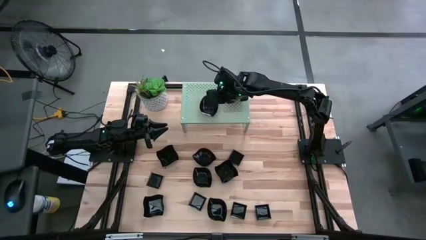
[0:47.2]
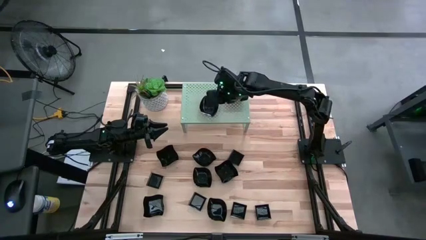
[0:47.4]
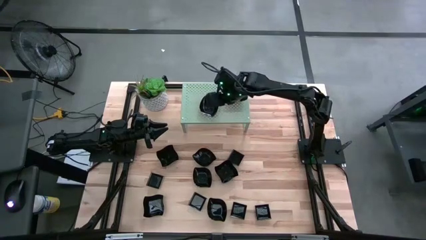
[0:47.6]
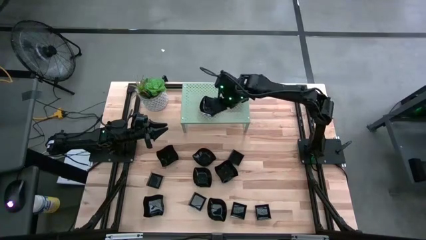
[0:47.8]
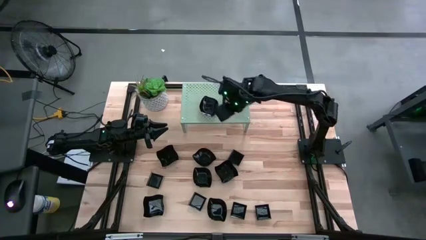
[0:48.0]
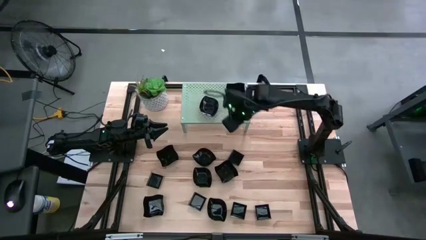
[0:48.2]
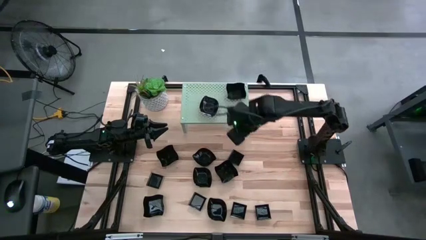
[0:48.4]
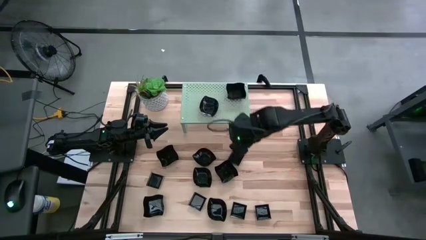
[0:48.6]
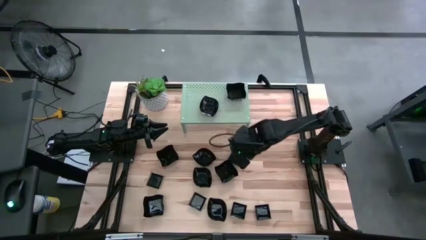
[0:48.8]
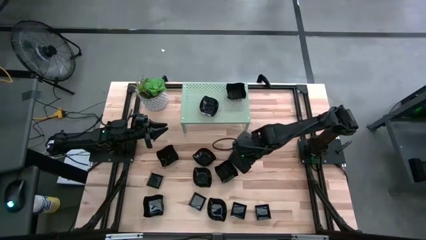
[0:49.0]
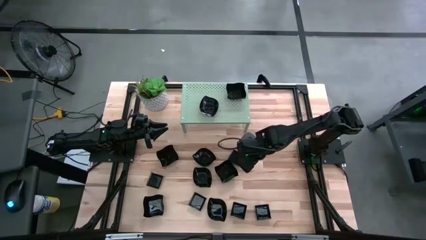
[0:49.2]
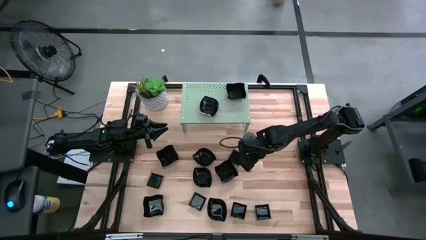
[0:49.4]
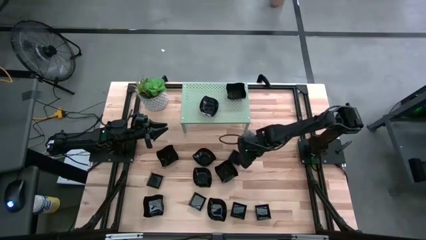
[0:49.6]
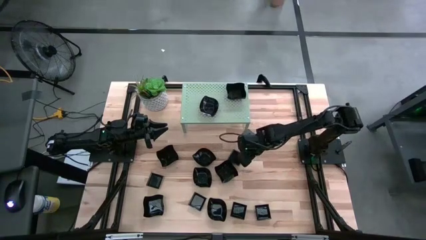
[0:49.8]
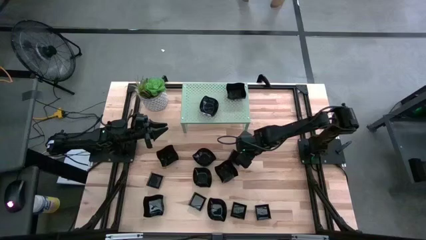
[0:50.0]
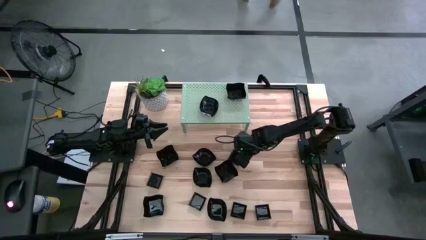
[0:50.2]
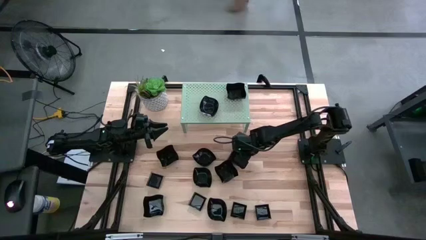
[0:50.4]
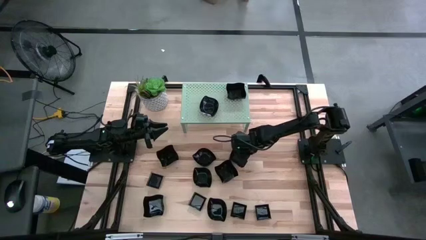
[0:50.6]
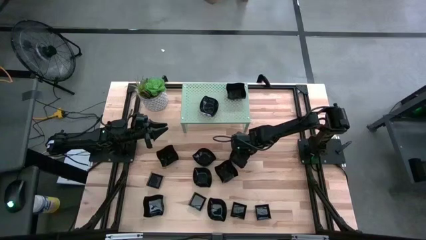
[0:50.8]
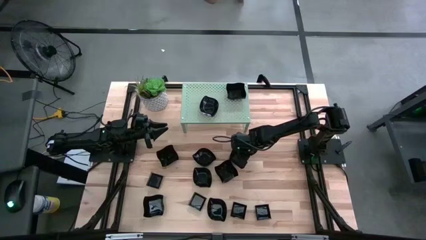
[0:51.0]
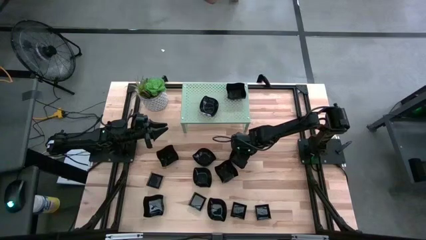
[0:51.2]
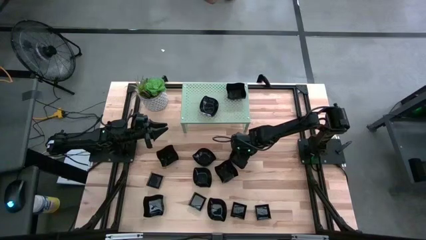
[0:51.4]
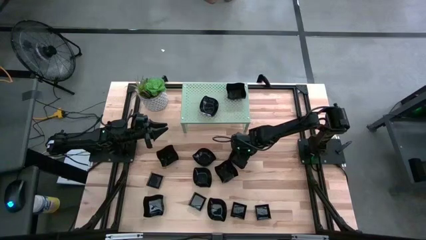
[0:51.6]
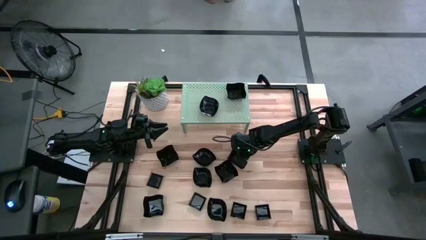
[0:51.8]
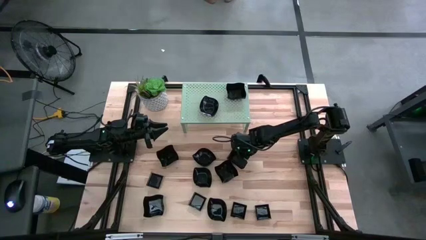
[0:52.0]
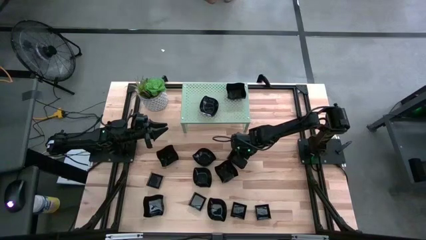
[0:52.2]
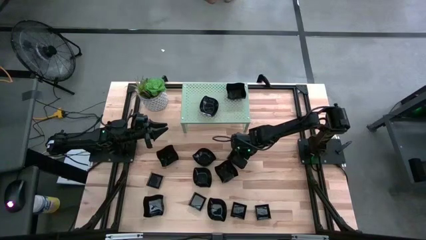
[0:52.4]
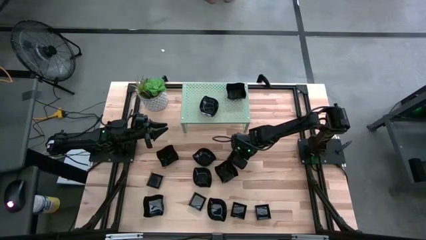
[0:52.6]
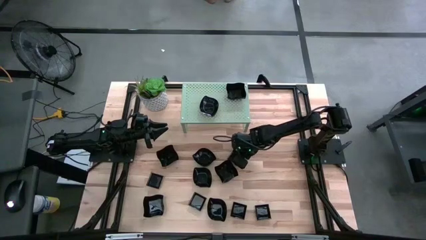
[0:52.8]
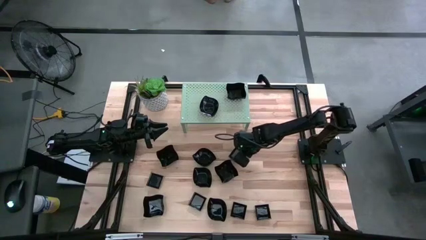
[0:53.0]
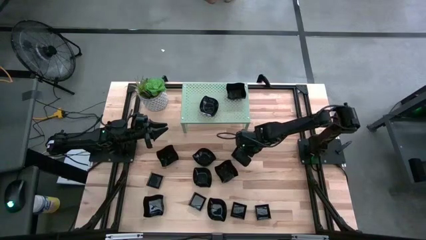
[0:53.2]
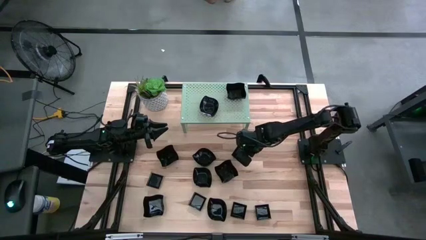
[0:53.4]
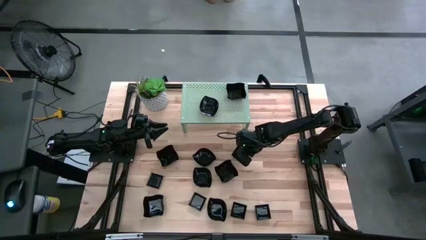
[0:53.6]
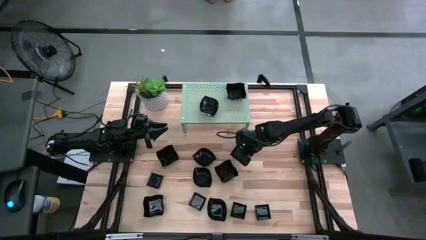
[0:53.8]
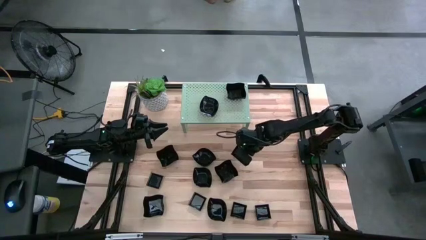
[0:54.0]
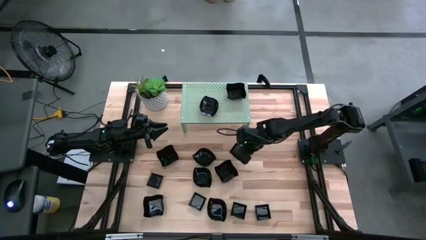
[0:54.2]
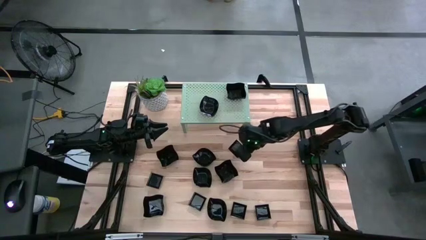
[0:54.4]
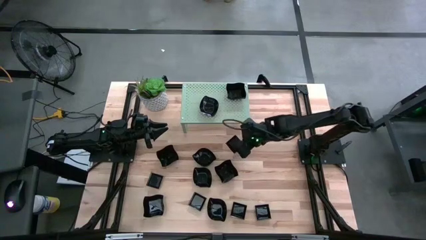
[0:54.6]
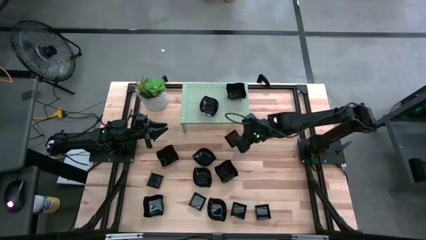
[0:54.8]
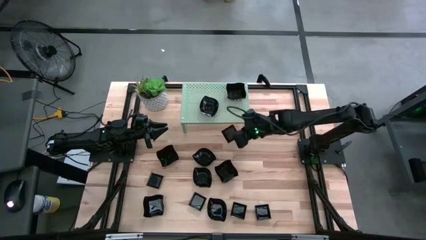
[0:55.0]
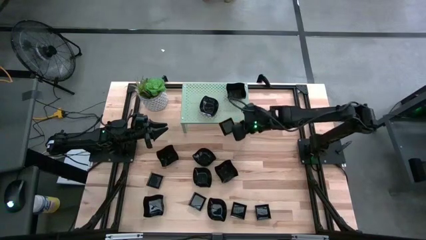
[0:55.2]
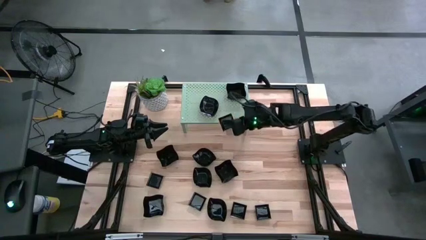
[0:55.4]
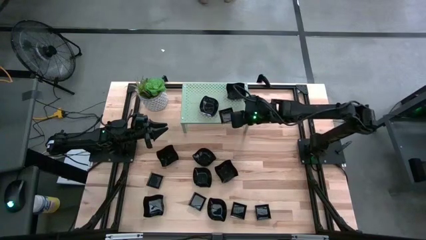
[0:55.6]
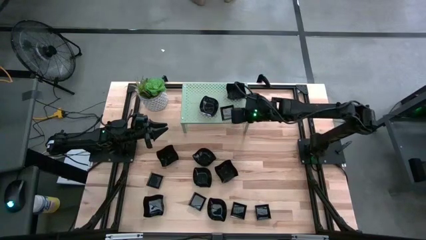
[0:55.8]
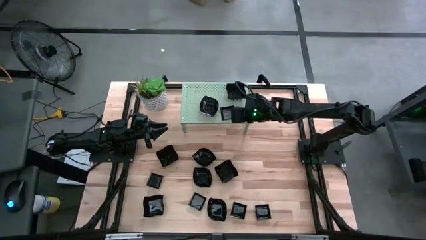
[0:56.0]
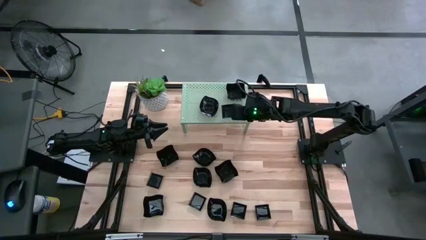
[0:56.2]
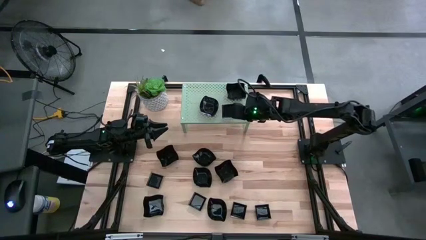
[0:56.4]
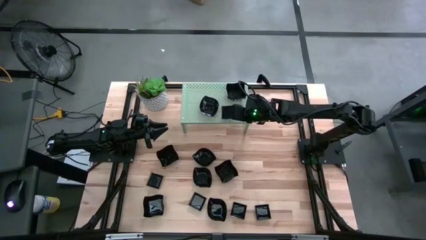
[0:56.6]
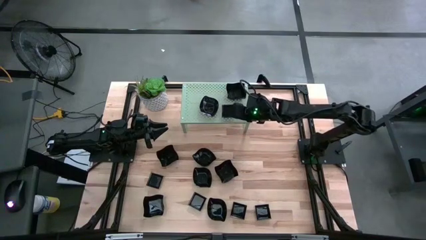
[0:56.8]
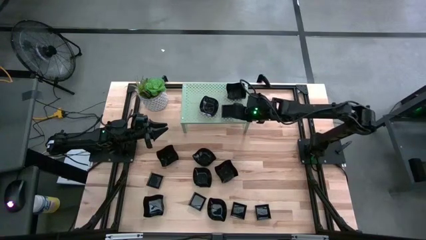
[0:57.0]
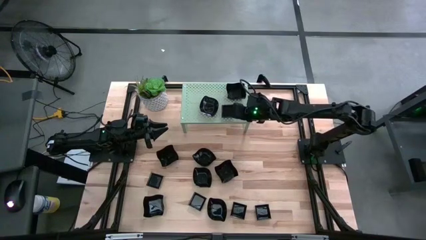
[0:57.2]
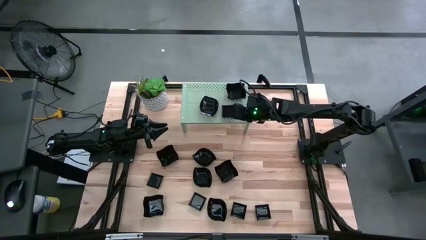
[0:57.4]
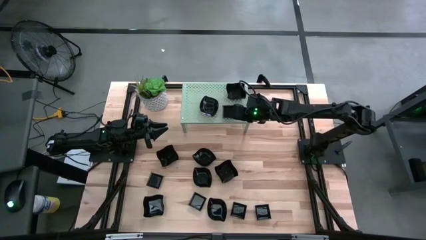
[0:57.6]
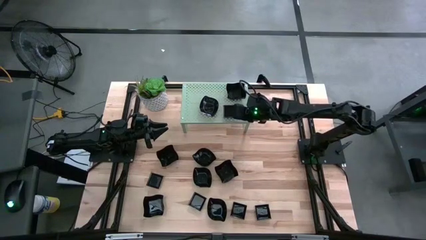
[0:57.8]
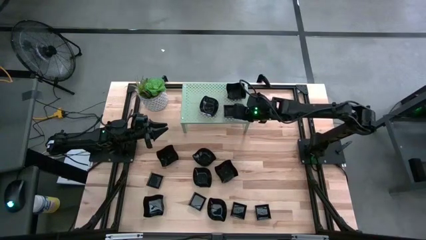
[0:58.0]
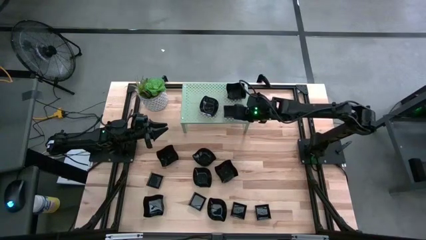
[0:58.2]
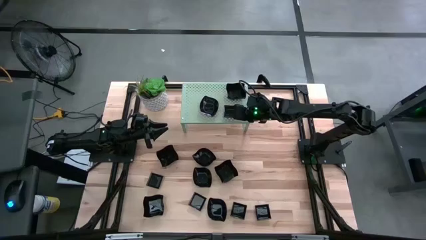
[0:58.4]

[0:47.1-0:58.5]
Task: Pick & Place Mini shaped plates
Put the square plate on the shelf

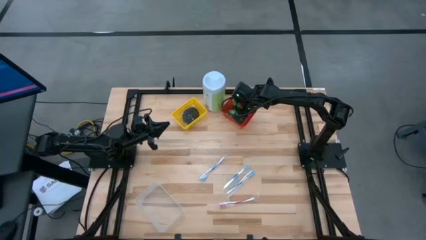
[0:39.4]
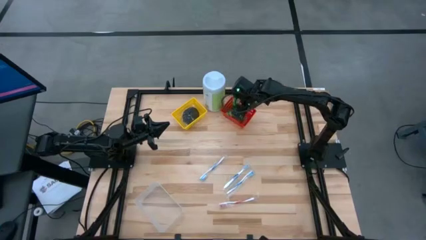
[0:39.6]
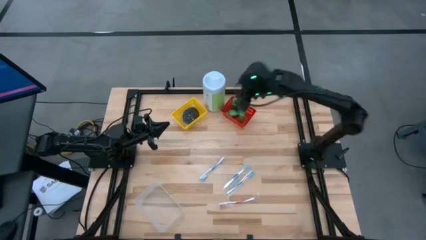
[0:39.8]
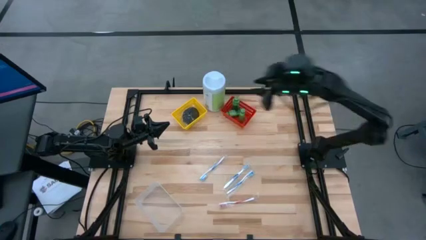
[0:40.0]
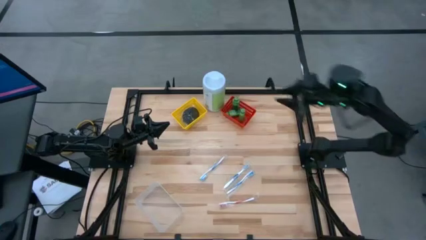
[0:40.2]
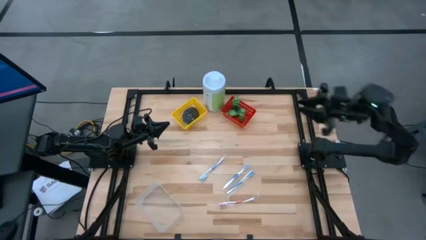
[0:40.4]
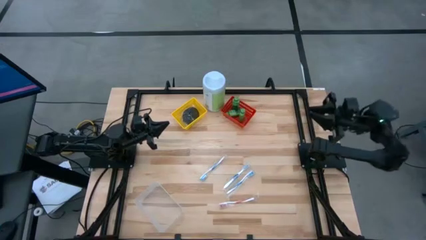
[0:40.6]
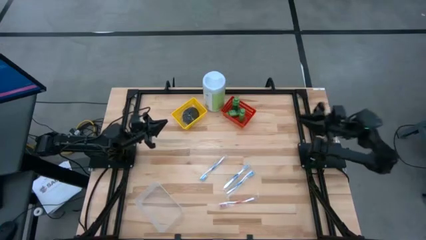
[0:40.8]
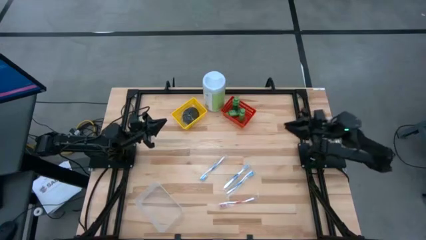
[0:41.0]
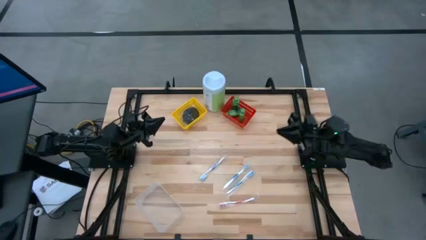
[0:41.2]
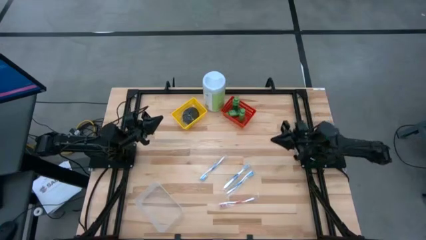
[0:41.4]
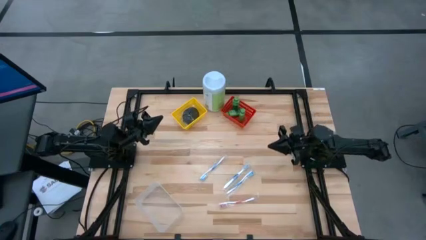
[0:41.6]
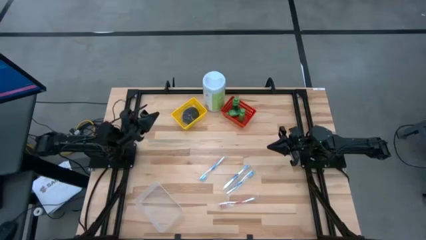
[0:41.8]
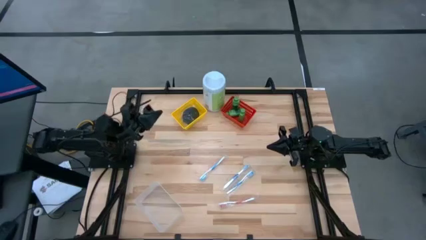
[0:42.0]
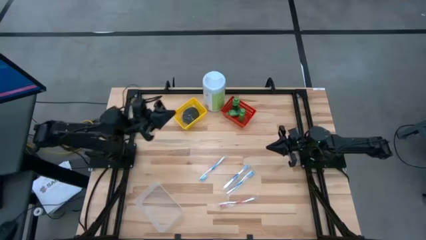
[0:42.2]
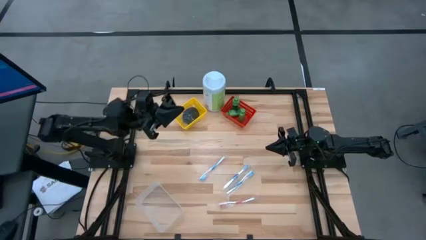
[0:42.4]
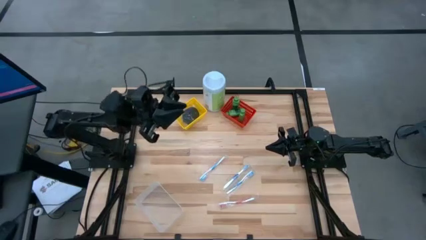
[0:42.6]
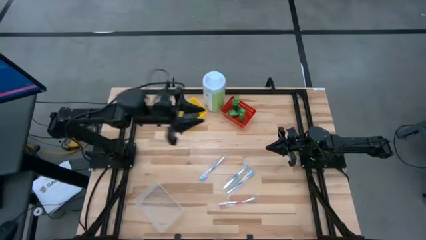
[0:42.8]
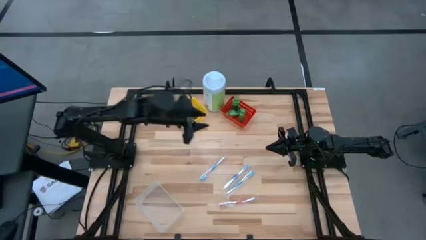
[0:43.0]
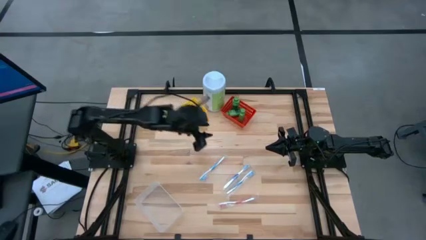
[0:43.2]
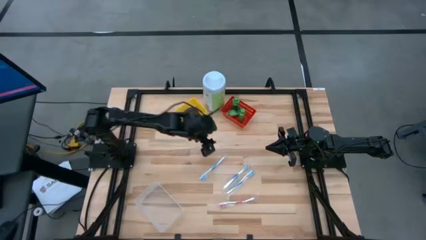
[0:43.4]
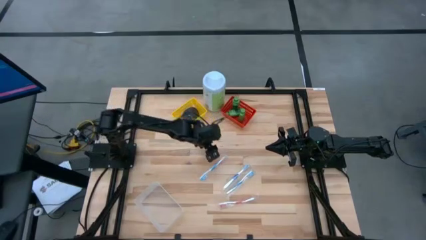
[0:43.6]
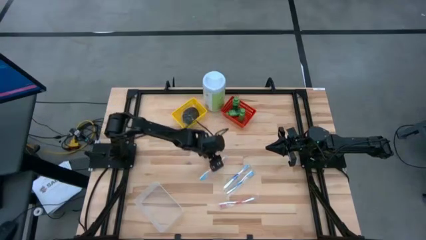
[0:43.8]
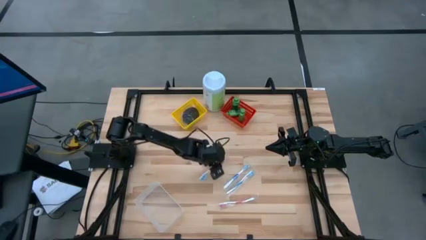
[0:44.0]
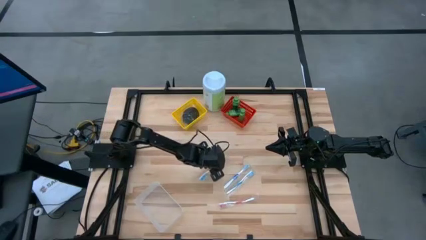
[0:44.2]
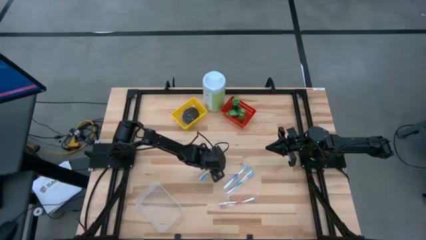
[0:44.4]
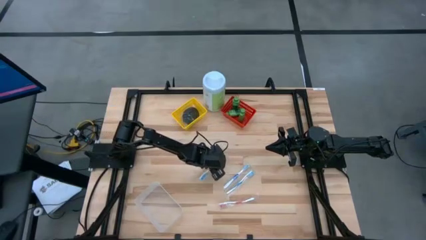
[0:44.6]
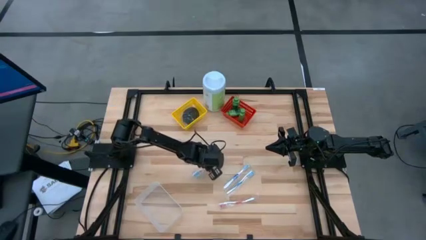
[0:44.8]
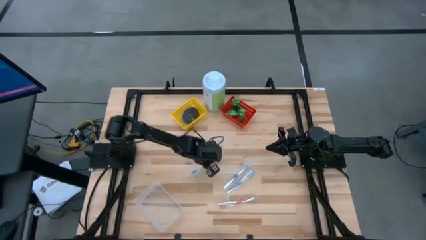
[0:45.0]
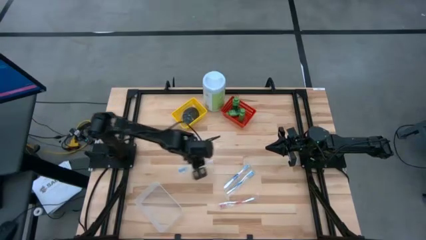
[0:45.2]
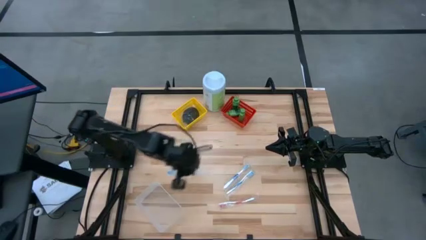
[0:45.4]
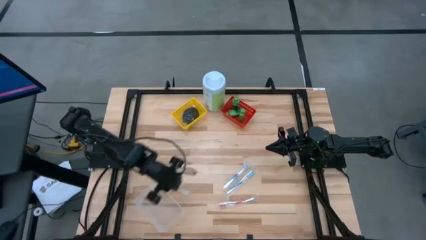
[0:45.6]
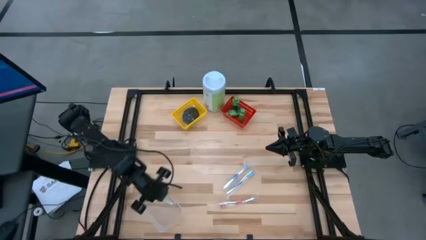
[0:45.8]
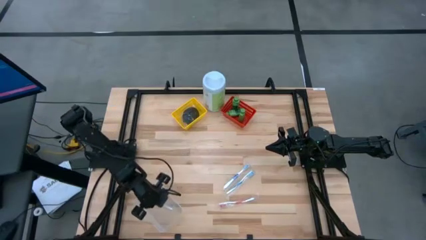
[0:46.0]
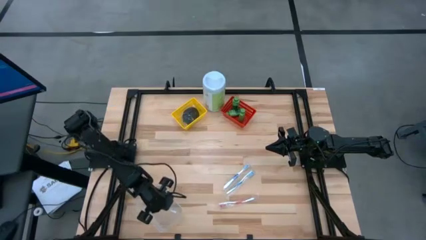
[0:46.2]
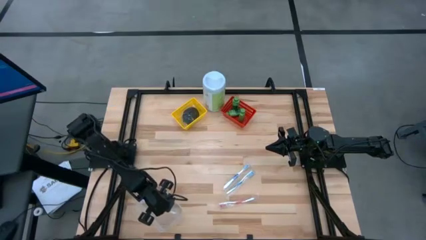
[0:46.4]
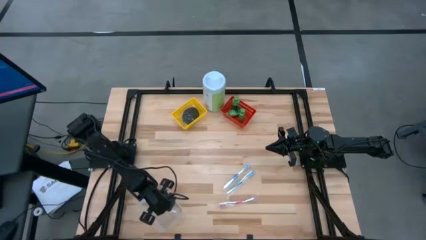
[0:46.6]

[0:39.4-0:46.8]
Task: Pick & Place Travel size toiletries
Put the top blue toothbrush into the transparent bin
